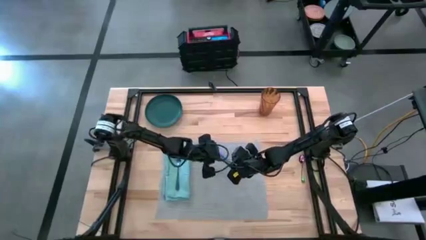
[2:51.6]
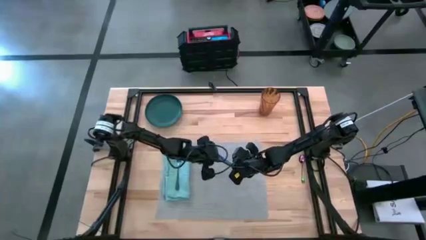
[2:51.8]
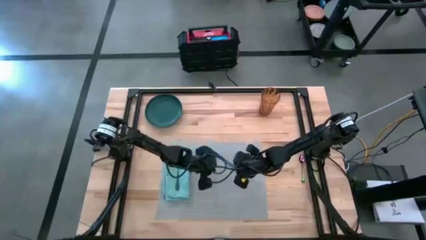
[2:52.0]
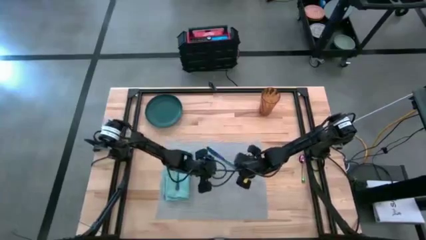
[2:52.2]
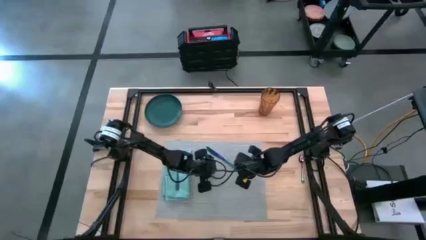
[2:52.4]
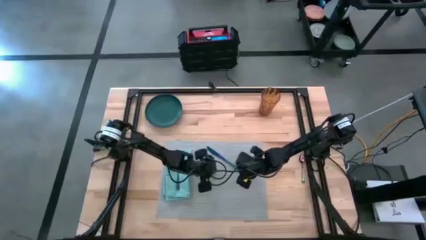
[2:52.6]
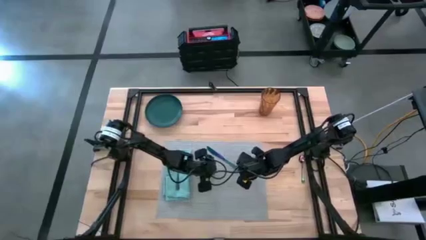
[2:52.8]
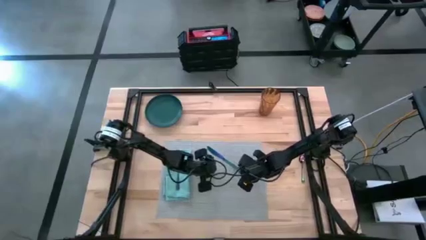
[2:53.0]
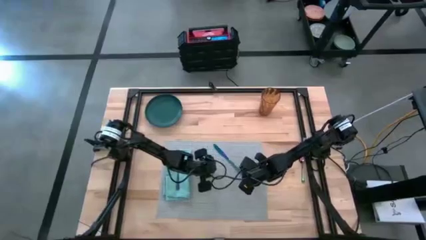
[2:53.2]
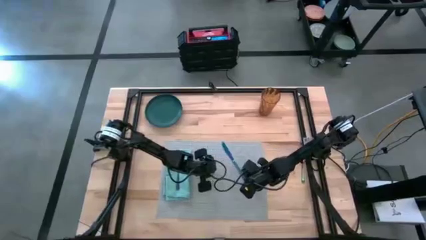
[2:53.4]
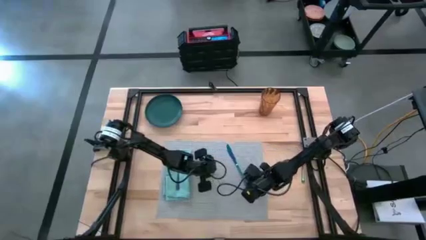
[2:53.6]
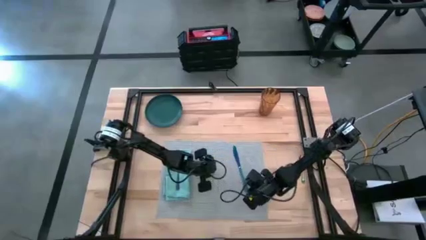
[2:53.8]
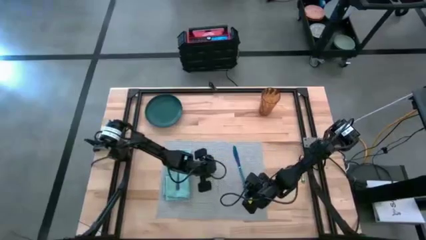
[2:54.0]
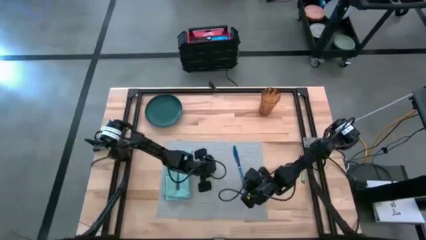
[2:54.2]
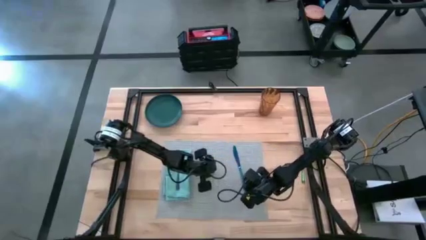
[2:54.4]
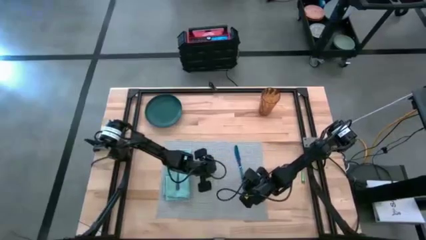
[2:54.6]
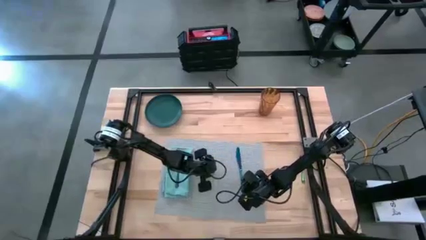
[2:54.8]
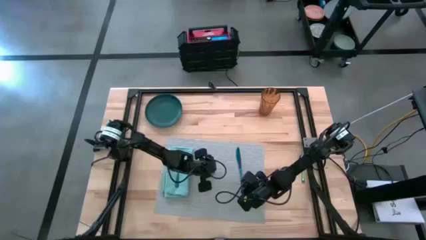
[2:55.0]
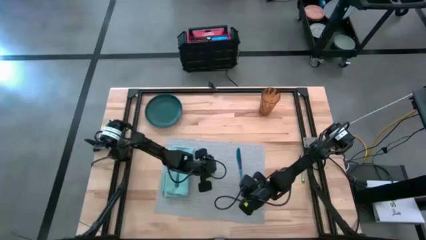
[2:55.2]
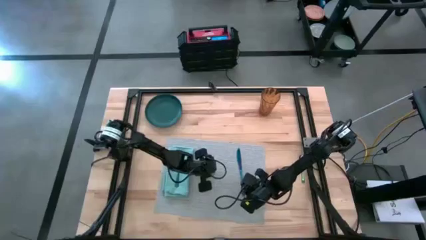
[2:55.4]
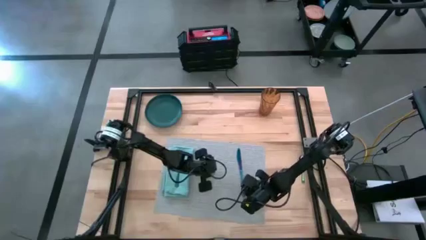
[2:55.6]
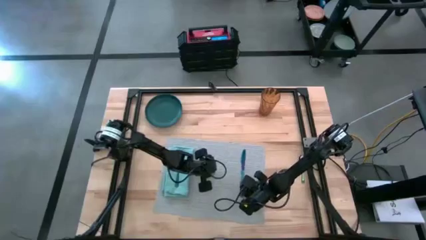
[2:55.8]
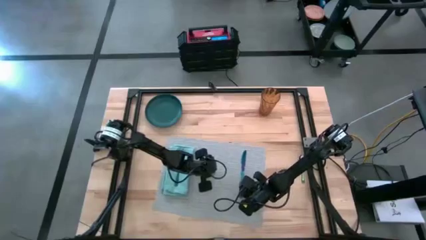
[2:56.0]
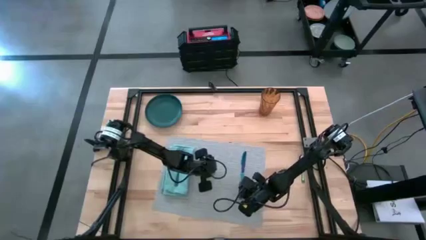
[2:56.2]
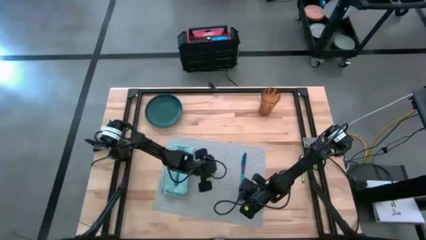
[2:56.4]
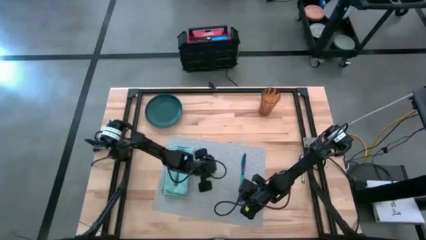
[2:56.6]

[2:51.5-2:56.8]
Task: Set table place
Put the blue table knife on the right of the gray tablemat

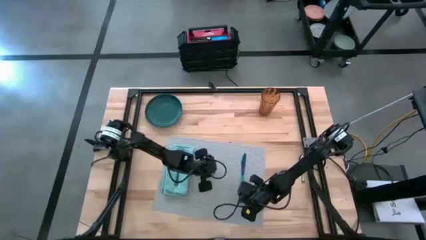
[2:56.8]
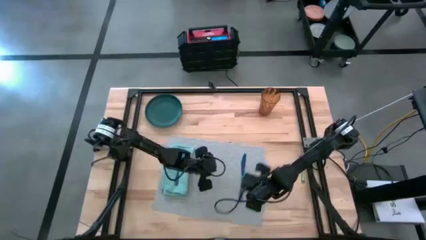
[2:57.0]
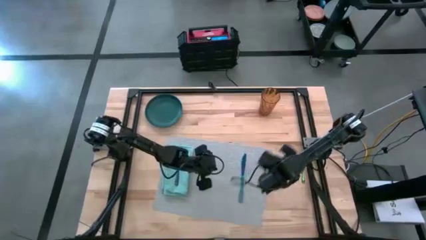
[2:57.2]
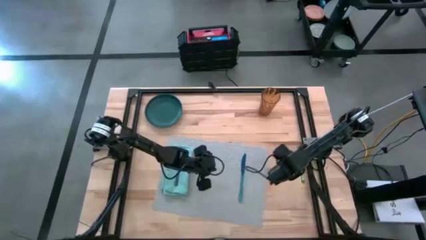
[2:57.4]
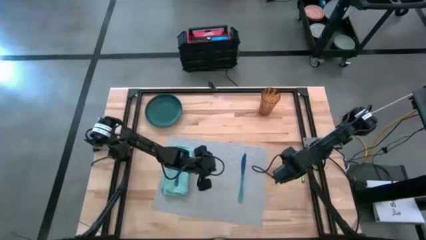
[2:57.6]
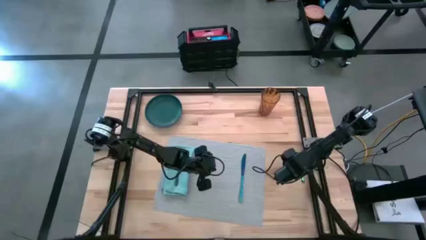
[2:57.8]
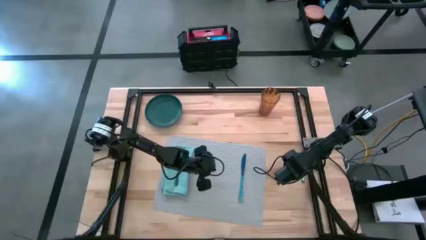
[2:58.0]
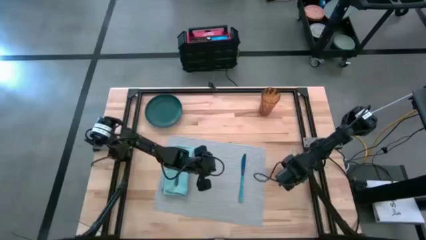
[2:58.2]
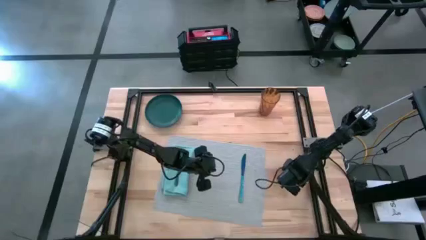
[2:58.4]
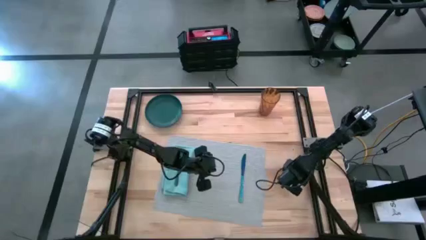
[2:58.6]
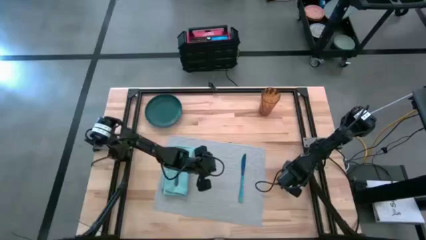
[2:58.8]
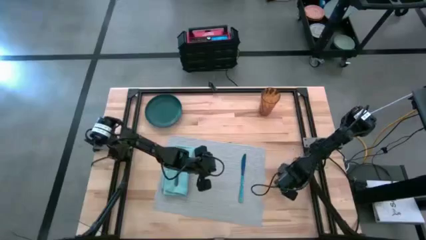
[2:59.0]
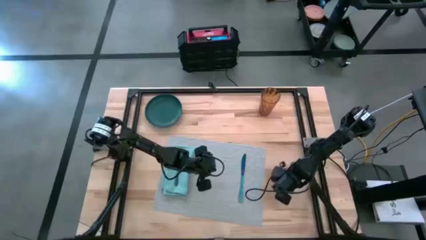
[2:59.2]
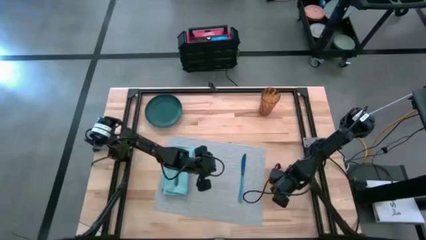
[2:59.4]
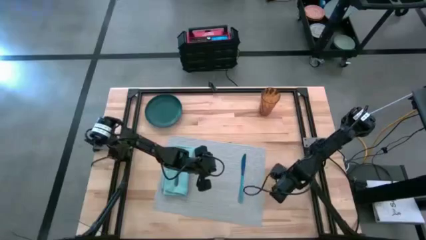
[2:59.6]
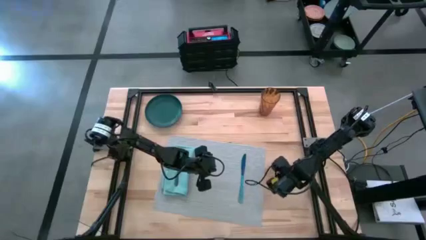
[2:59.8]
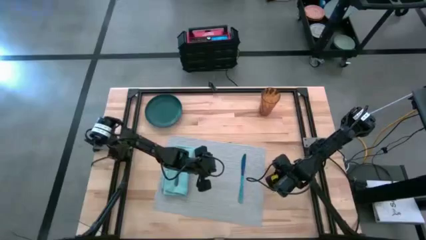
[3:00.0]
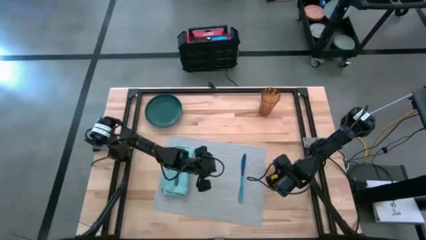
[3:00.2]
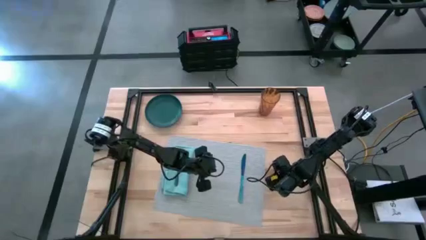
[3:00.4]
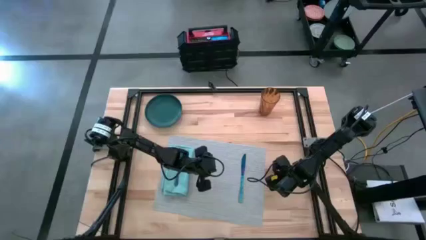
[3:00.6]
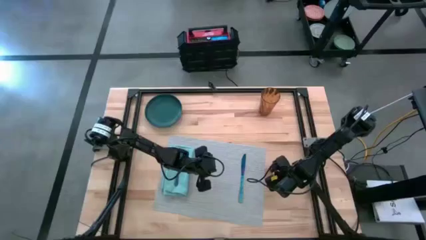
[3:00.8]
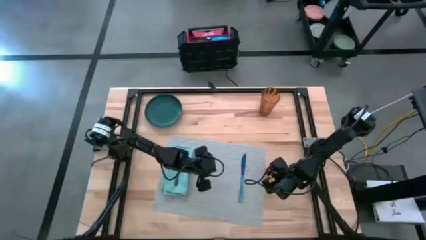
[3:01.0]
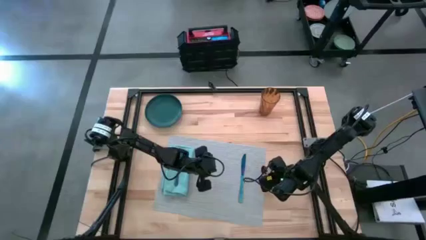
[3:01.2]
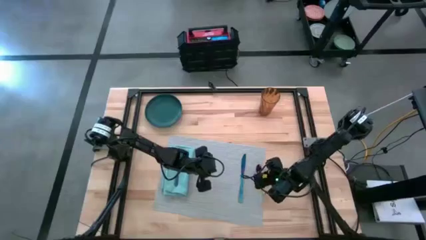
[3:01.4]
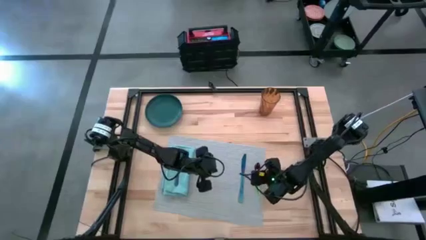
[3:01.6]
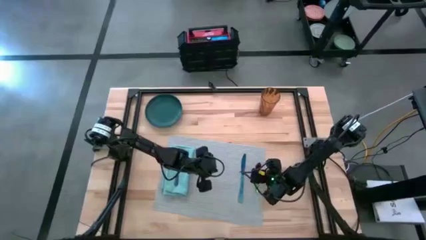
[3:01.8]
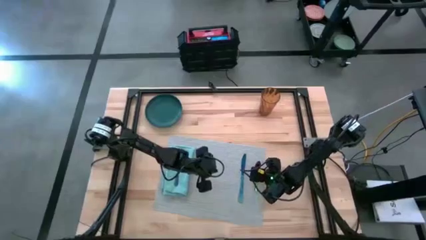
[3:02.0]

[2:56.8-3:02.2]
Put the blue spoon on the gray tablemat to the right of the blue table knife

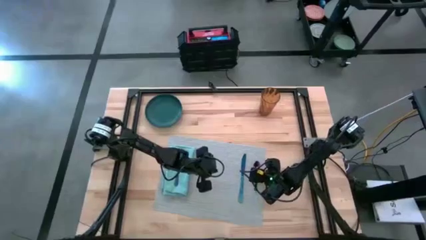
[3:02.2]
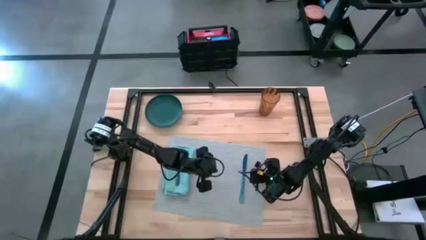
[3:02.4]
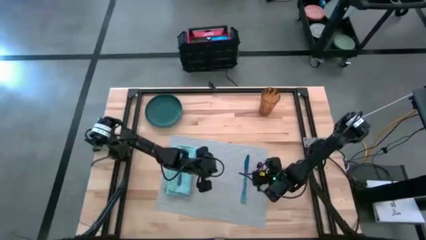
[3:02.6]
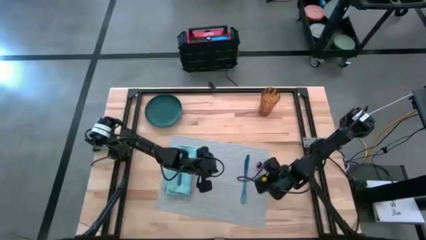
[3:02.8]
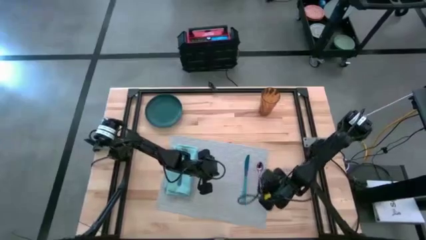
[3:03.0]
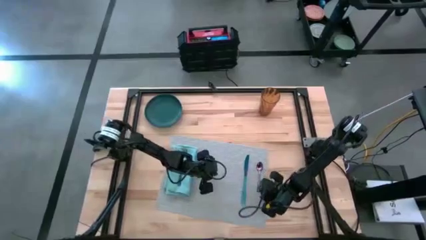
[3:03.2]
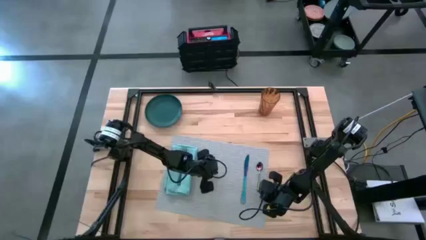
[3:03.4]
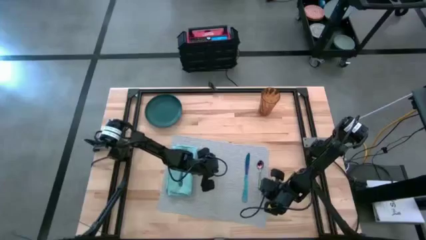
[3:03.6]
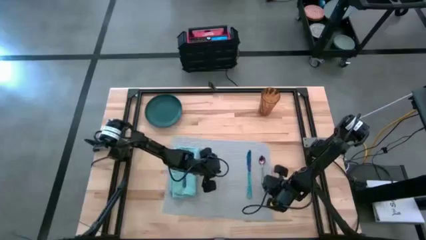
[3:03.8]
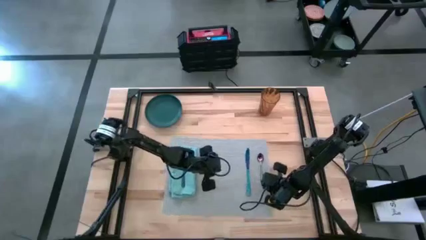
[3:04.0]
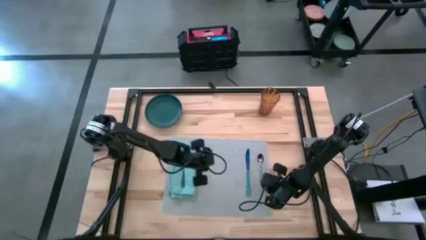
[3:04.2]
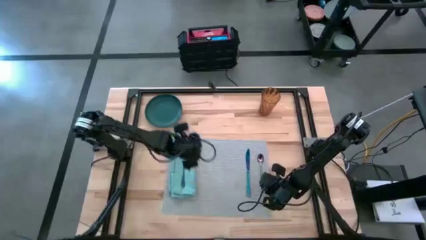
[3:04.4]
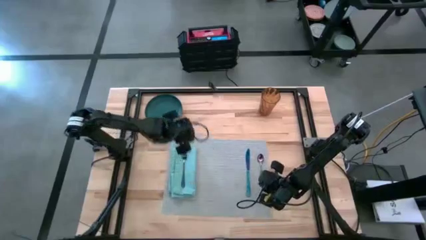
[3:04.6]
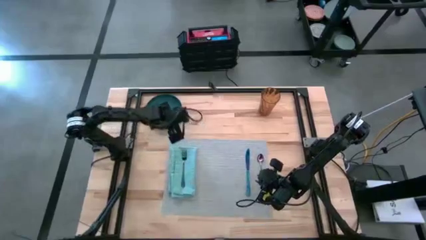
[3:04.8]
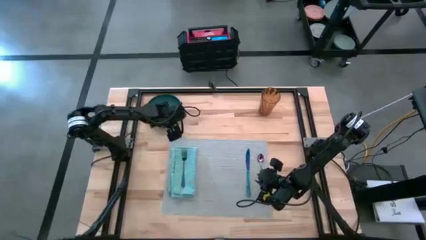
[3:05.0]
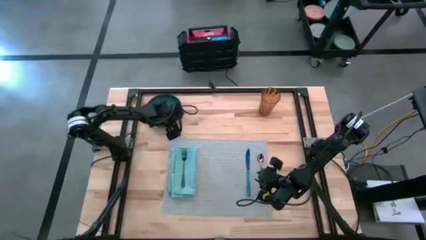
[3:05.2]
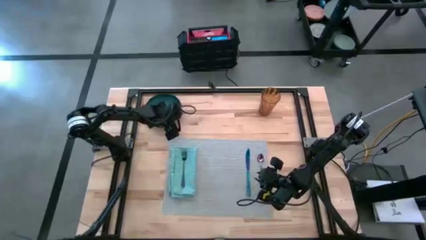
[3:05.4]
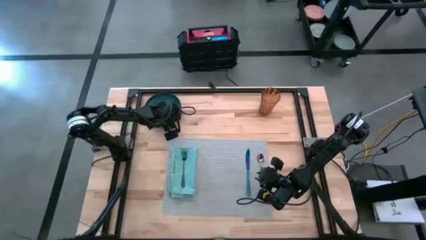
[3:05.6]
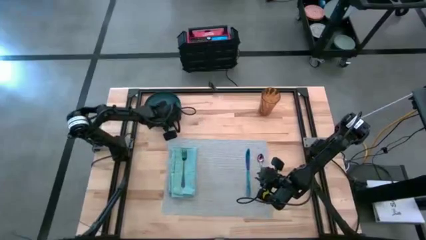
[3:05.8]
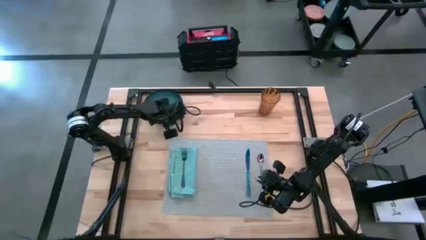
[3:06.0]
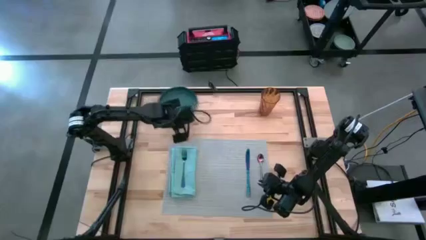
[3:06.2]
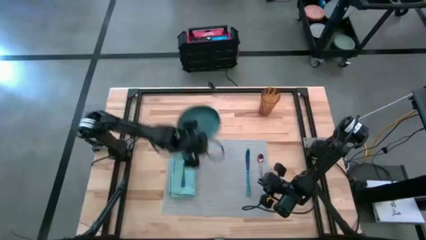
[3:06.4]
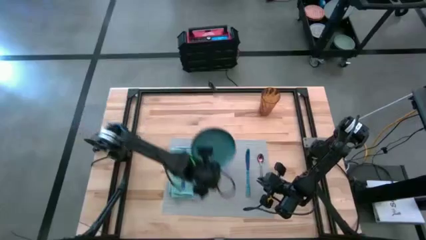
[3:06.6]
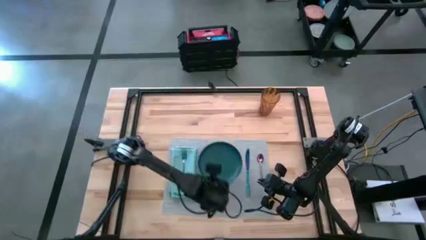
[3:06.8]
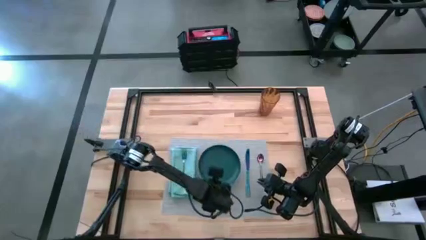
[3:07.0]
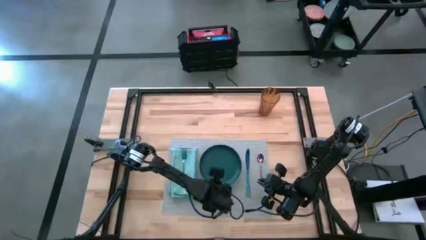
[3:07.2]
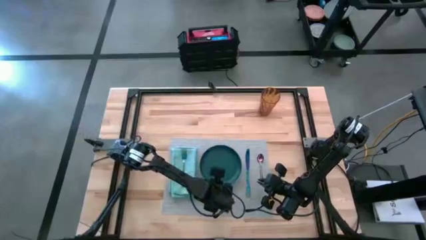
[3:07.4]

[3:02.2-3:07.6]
Put the plate on the gray tablemat to the right of the light blue table napkin

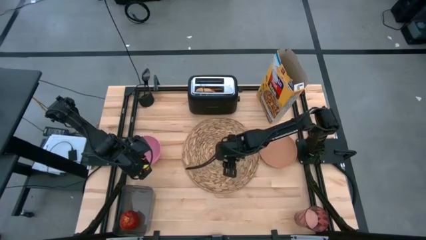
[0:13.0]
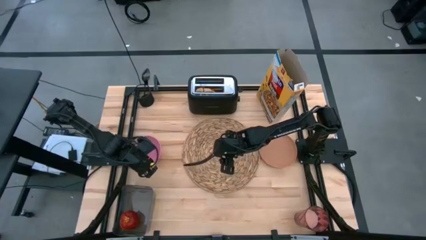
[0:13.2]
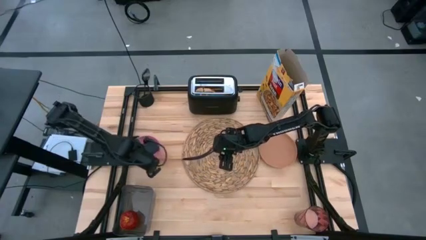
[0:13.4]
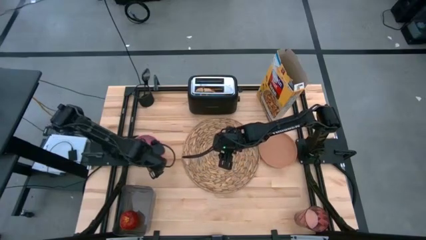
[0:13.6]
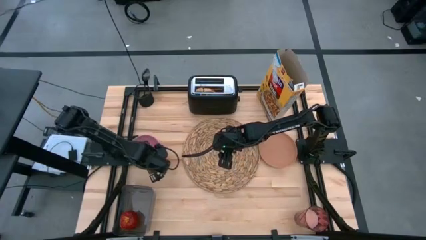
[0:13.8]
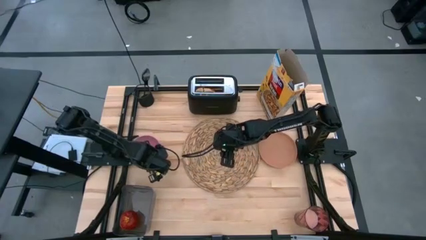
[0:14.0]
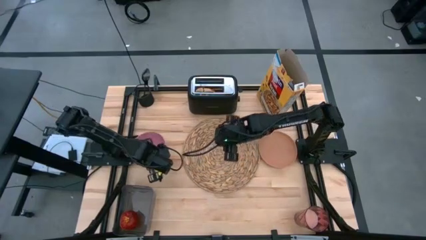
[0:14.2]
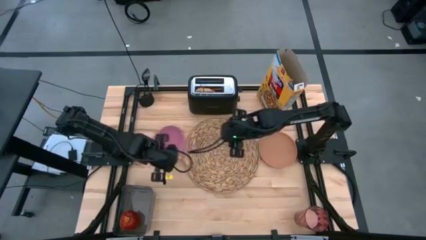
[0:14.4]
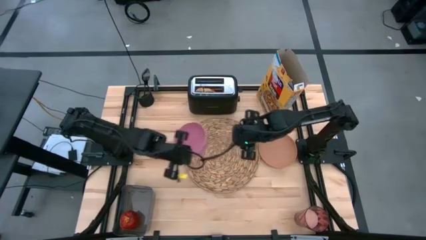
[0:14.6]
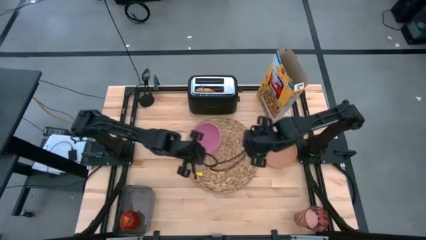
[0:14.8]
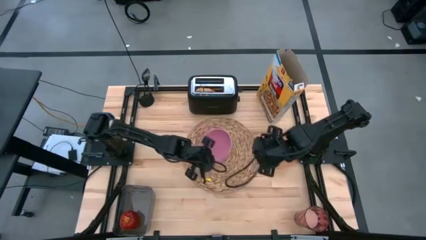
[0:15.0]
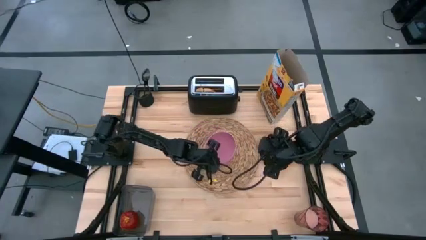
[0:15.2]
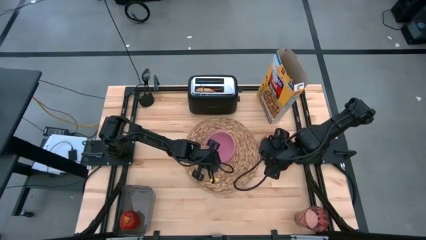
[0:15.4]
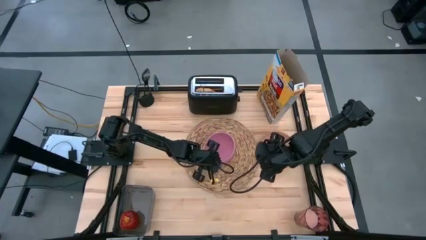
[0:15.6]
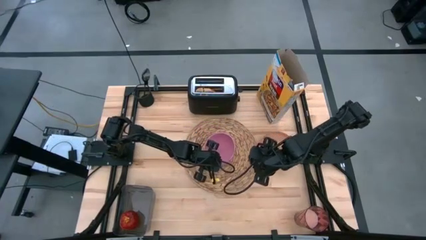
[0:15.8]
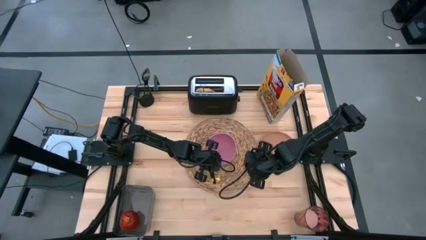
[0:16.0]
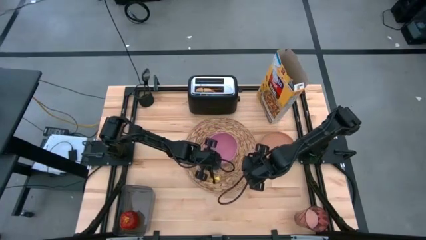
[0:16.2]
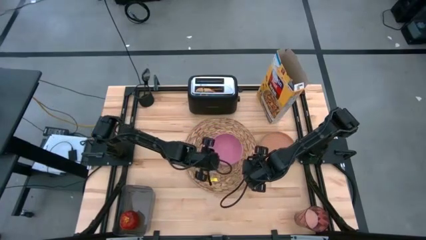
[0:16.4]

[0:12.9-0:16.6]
Task: Arrange a breakfast setting
Put the pink bowl on the brown placemat
